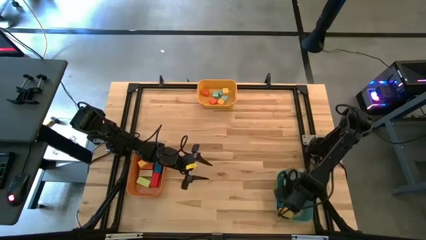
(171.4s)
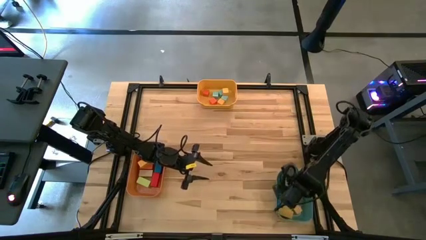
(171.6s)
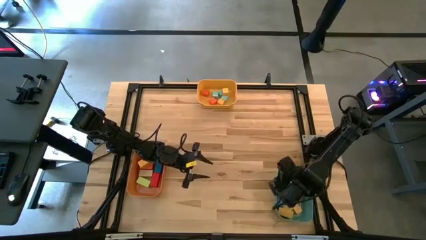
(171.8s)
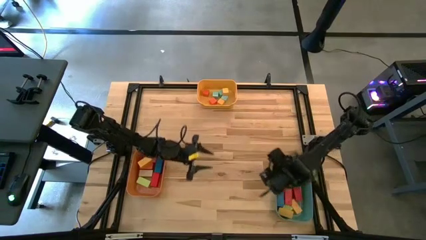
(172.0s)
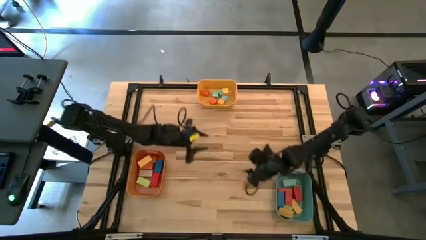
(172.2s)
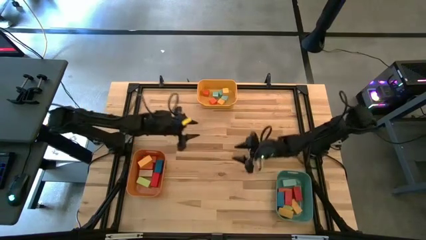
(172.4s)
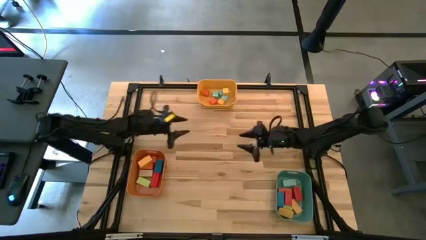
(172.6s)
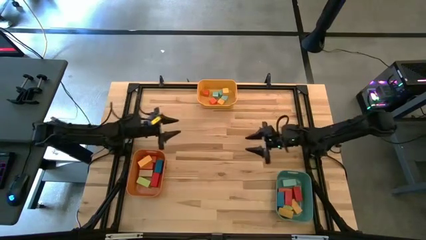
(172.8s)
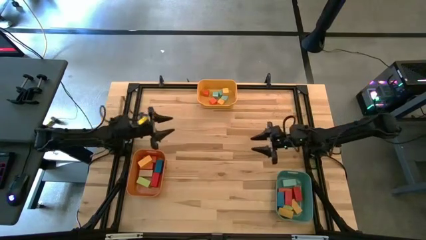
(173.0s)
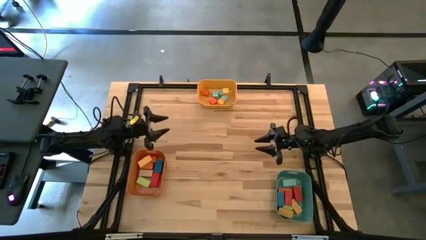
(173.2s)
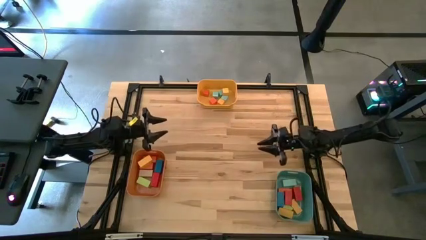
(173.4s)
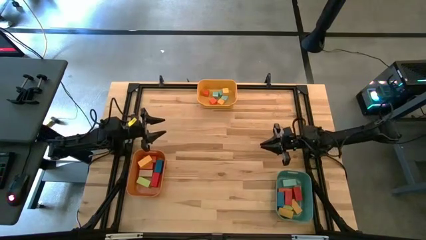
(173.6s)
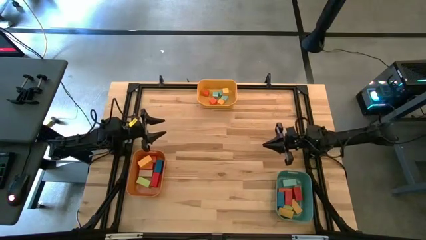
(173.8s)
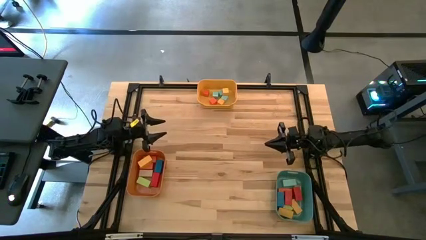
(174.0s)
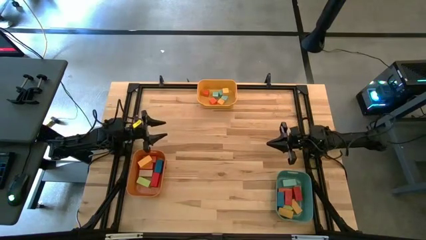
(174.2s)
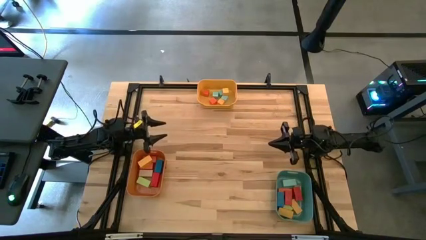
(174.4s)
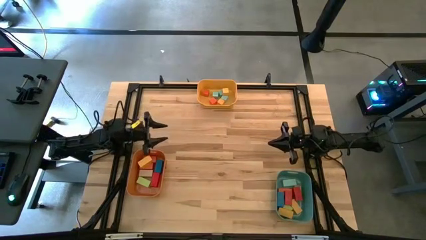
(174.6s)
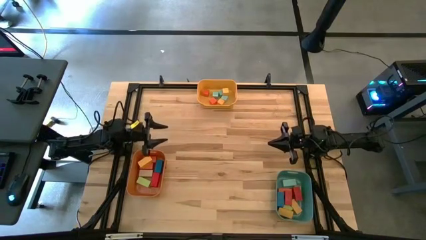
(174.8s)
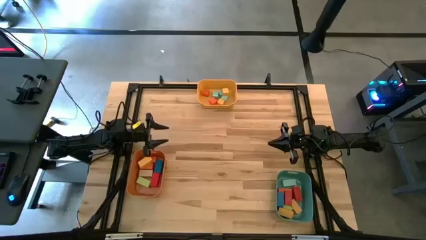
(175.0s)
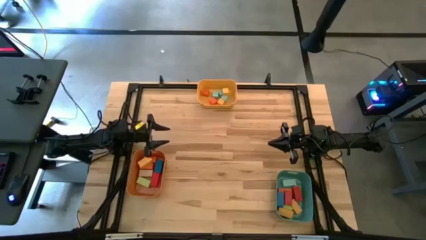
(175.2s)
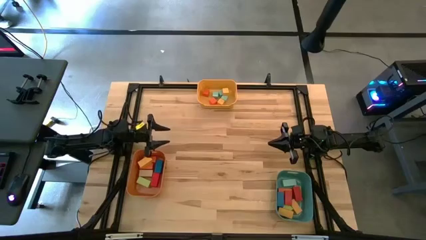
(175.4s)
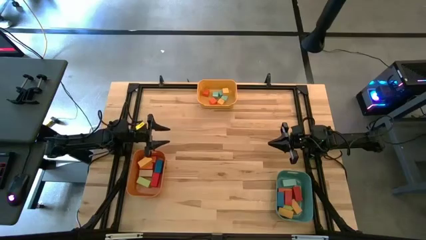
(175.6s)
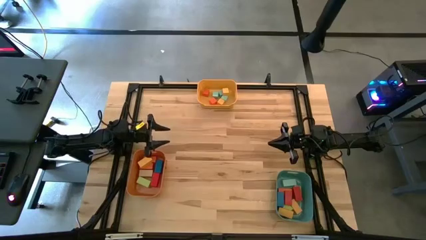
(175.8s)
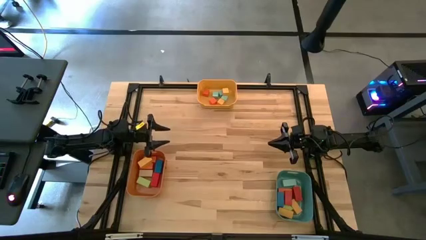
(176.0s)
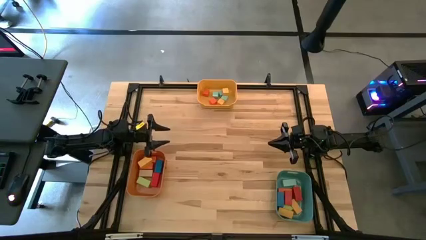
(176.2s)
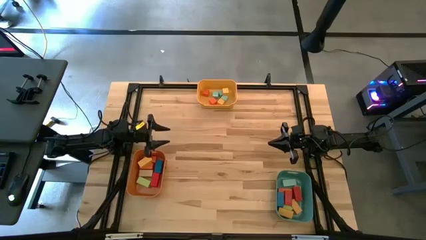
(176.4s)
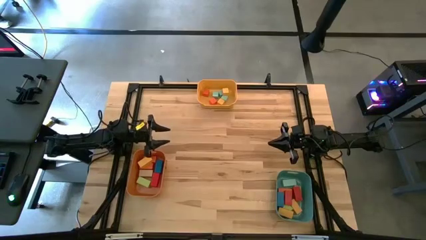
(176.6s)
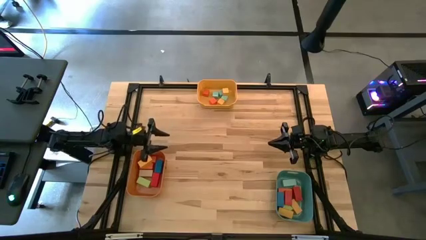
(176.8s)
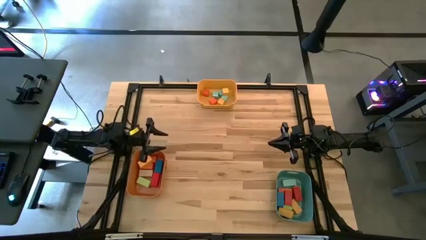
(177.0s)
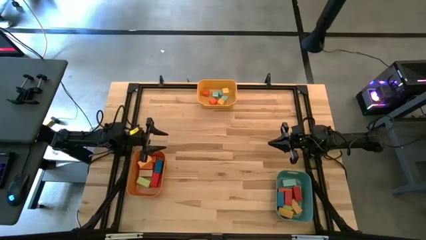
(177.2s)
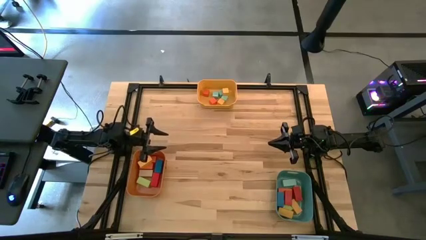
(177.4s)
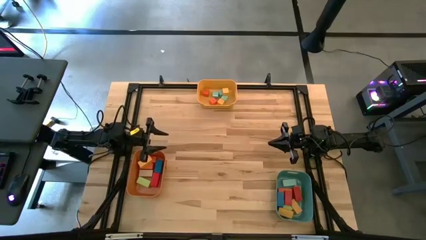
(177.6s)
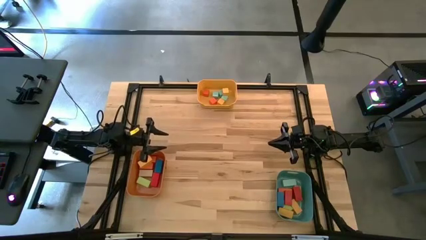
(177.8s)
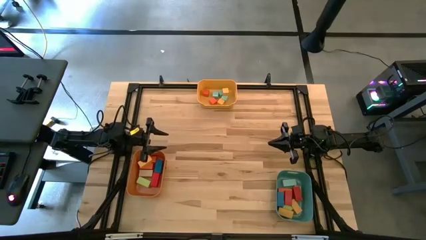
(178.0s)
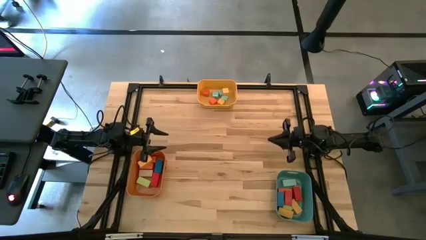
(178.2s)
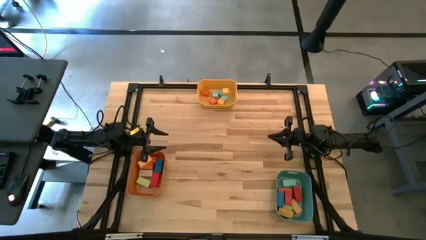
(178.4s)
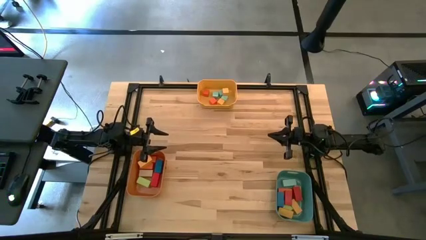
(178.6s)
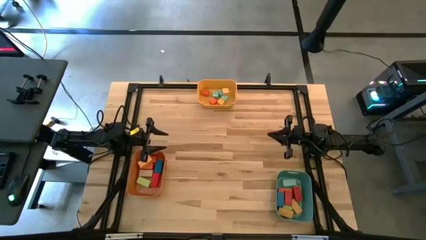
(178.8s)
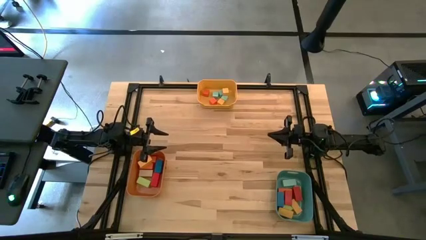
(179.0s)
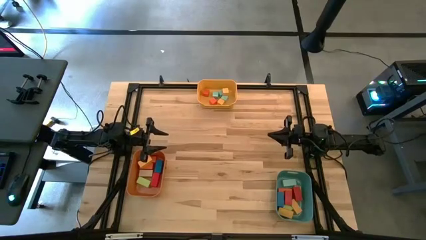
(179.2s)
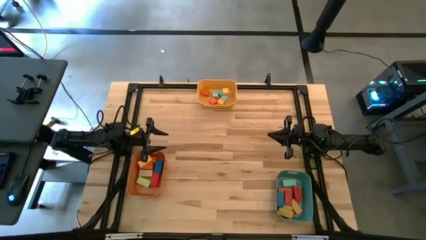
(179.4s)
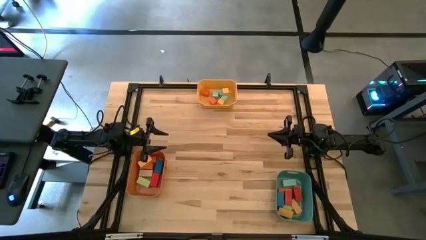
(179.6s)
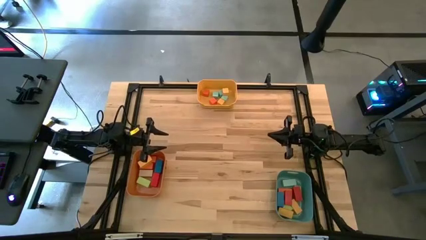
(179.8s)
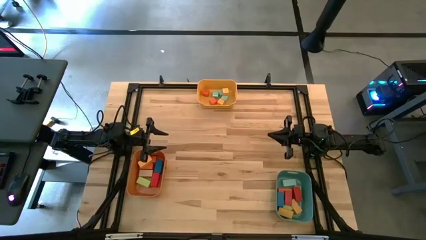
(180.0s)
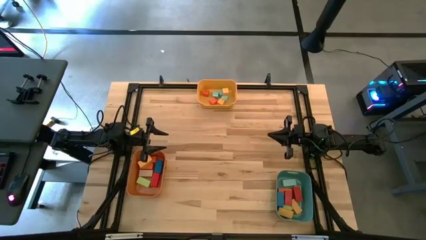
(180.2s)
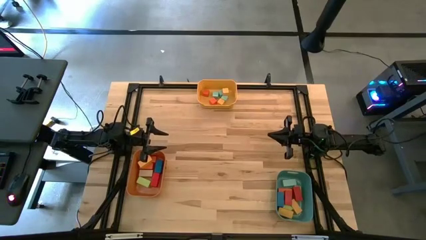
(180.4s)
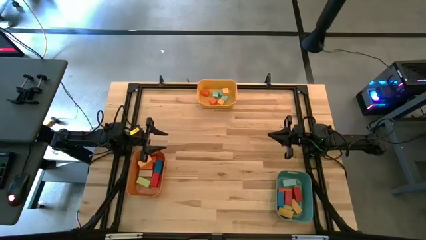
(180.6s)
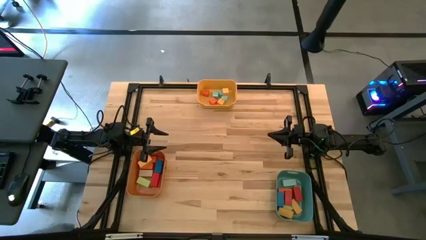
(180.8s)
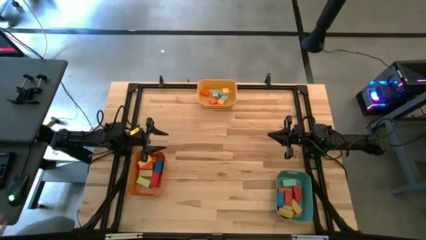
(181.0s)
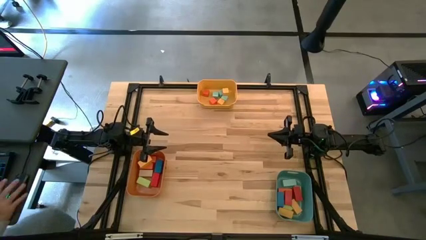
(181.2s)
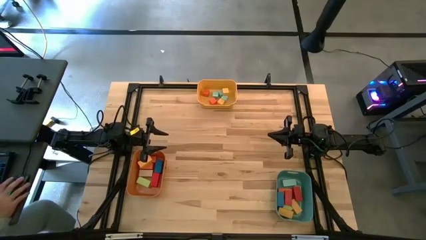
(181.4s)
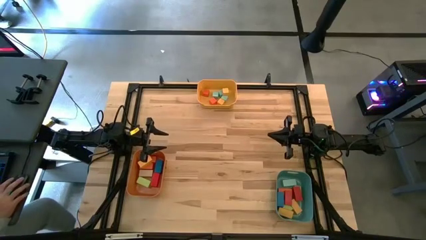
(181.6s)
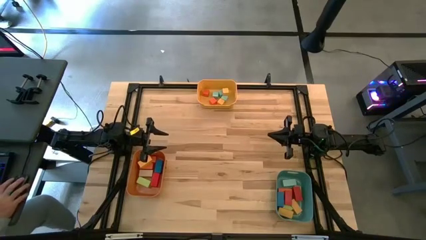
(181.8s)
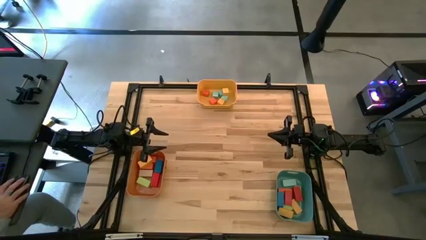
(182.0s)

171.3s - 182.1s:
Task: Sort blocks by size
Return to Home Position

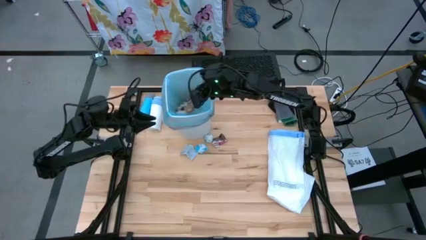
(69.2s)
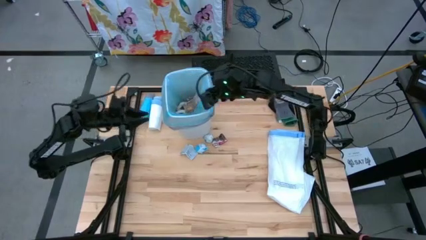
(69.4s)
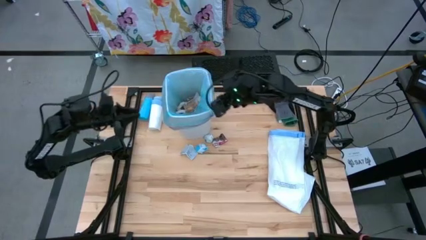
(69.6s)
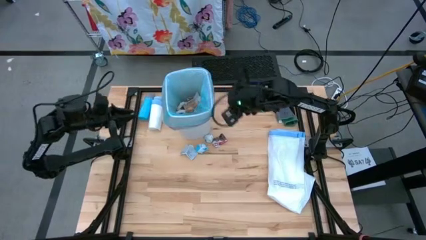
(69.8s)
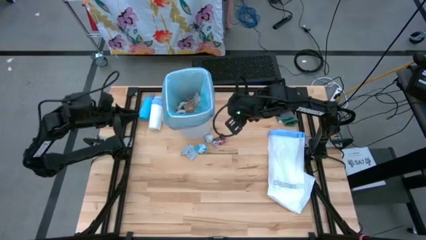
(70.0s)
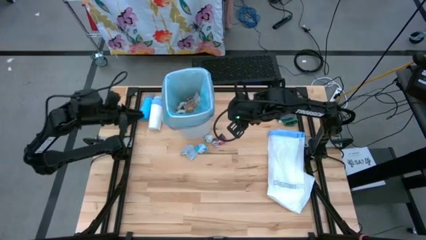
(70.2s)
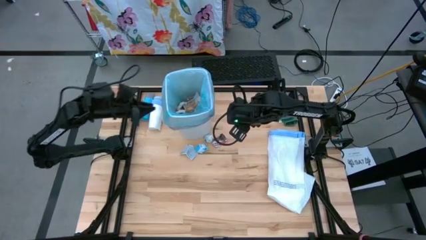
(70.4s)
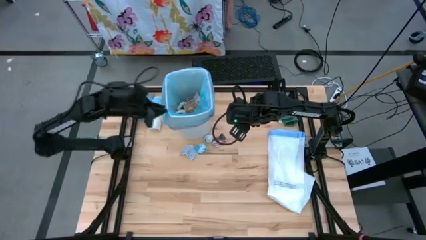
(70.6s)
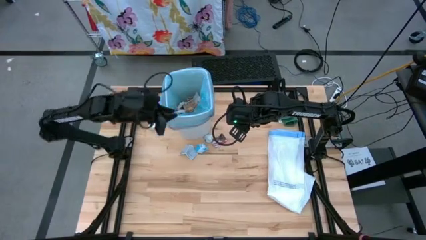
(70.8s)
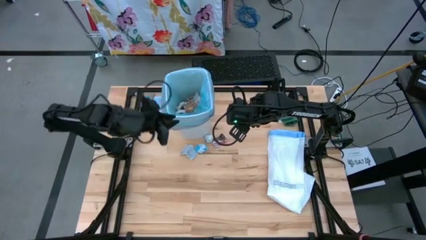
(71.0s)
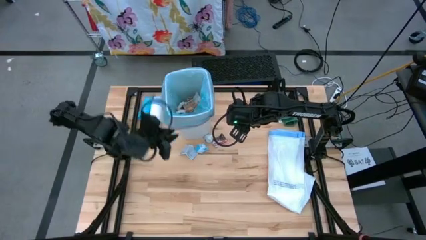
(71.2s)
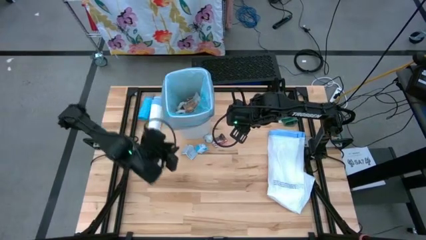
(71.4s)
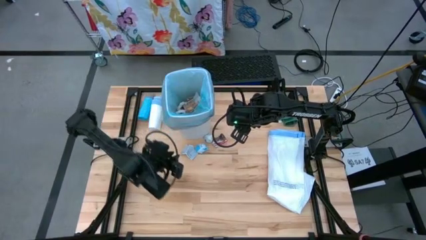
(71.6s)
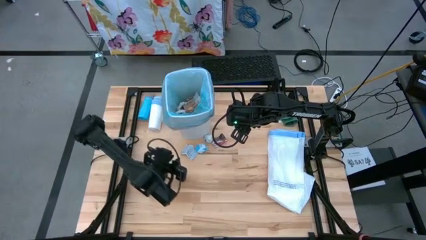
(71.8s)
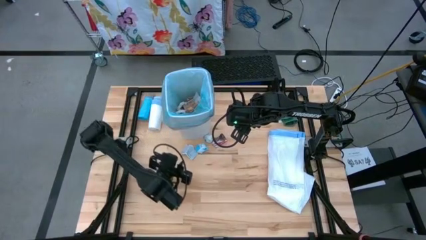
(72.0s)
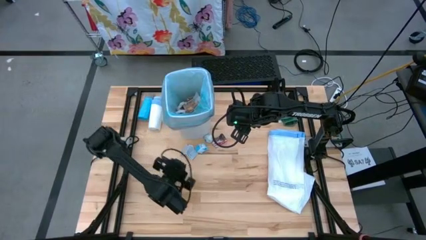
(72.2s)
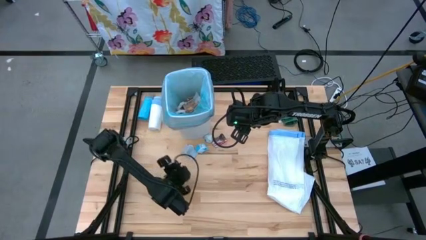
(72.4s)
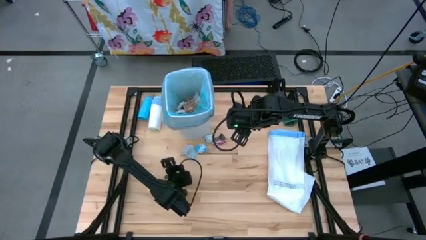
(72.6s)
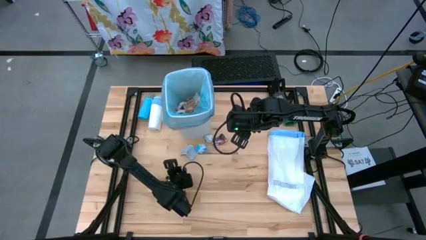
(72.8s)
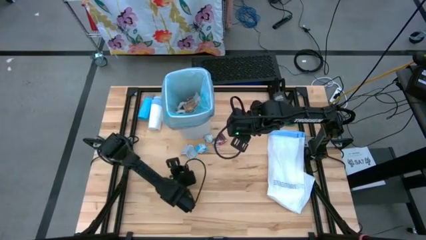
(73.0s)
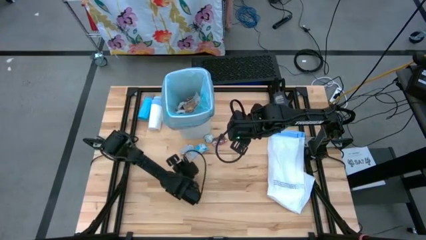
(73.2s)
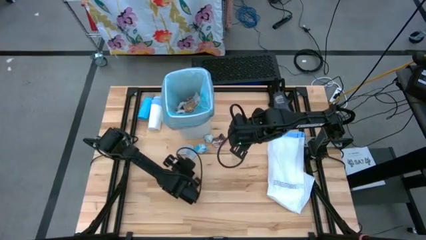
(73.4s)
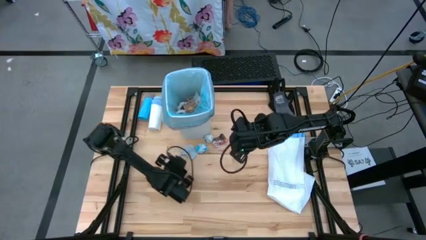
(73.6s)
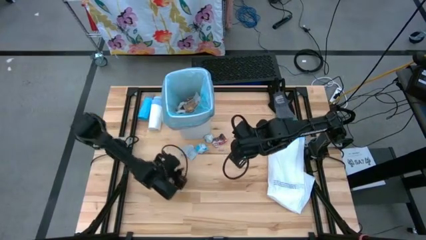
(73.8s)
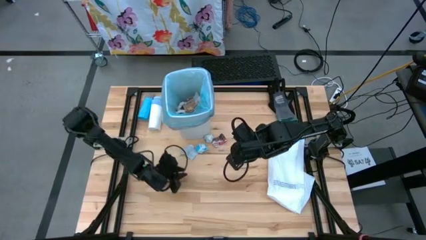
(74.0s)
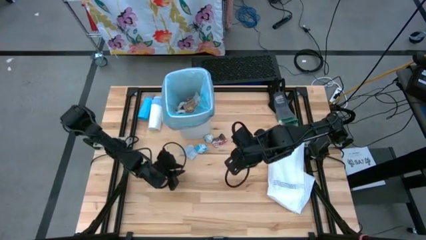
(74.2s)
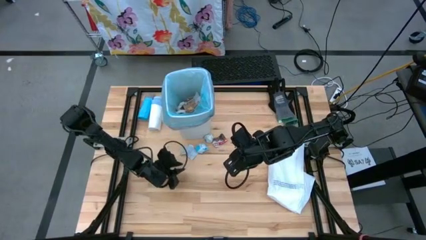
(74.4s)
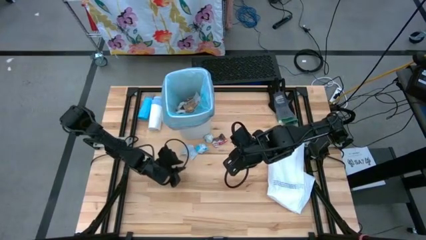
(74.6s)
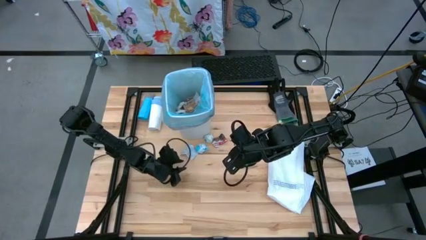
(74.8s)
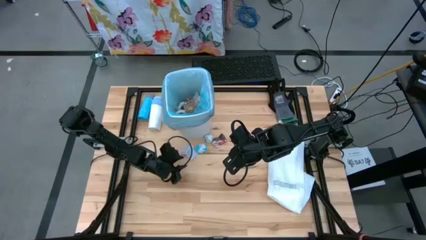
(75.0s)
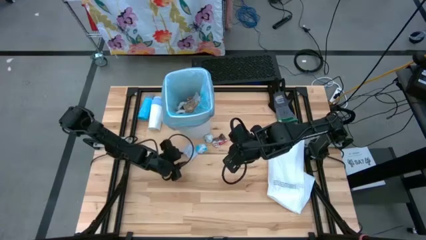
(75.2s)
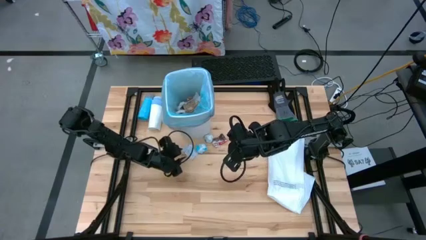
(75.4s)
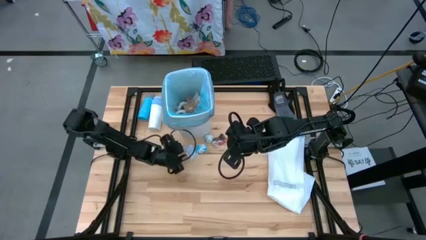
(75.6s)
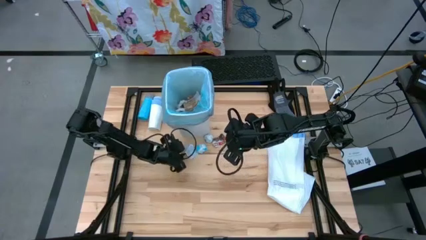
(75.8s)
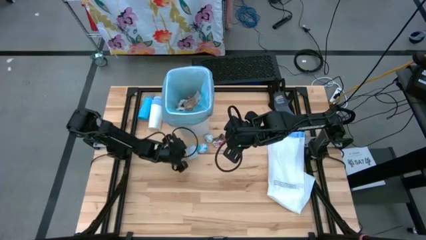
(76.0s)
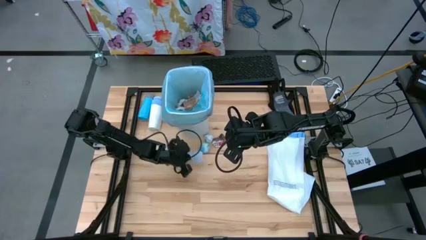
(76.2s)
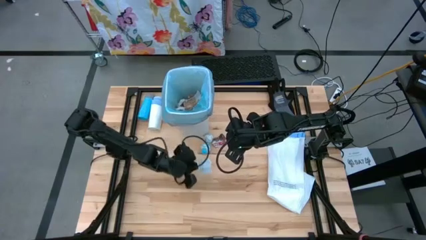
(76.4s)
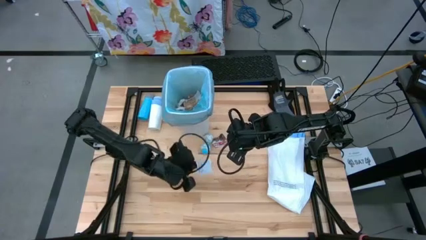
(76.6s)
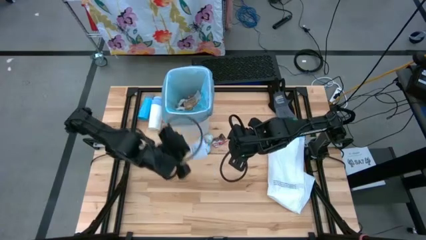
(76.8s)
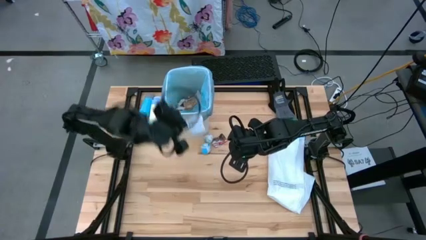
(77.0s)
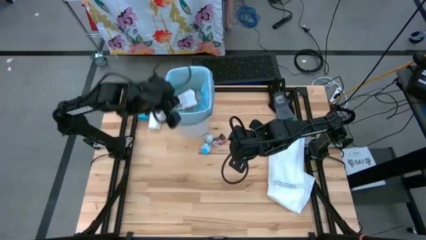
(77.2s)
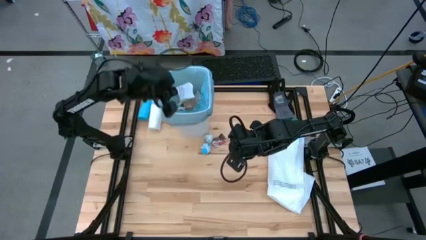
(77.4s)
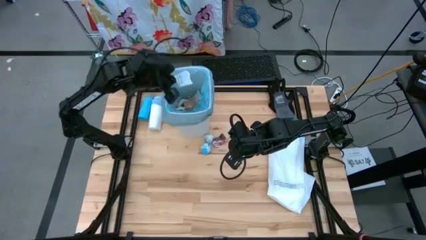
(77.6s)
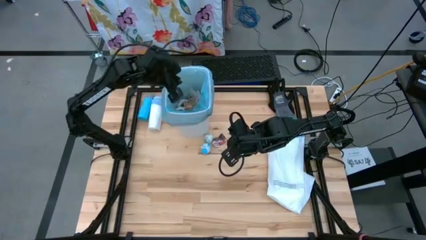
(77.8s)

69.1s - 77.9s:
Task: place trash/remove bag and relplace
Put the white paper into the white trash bin
